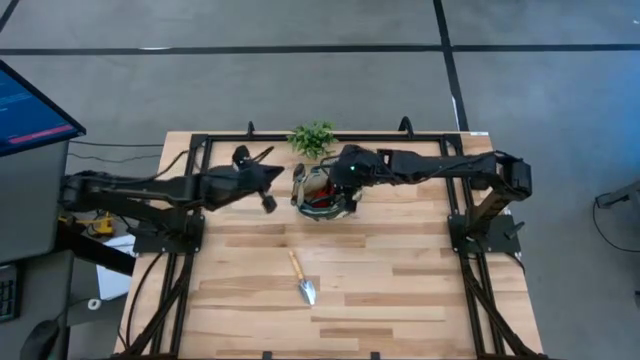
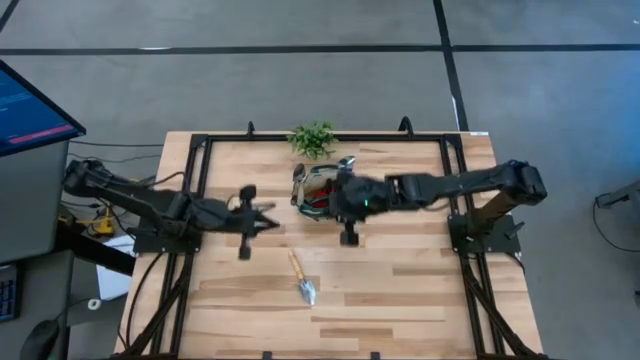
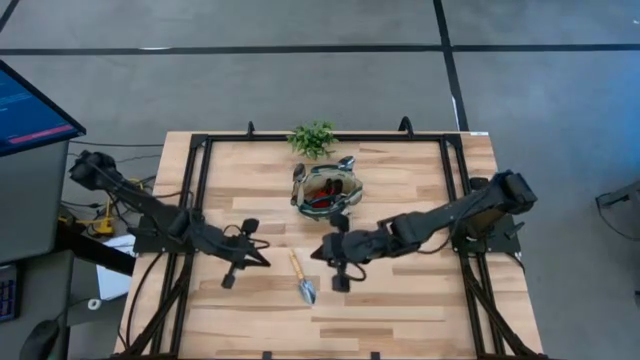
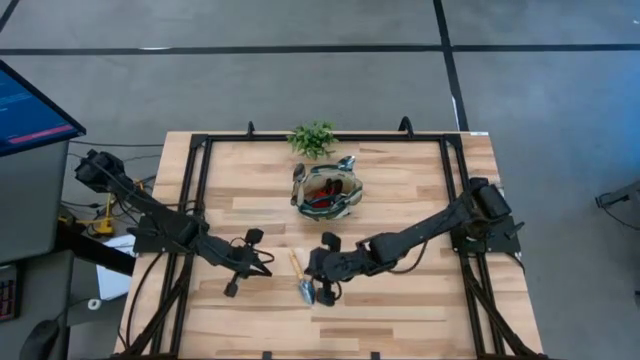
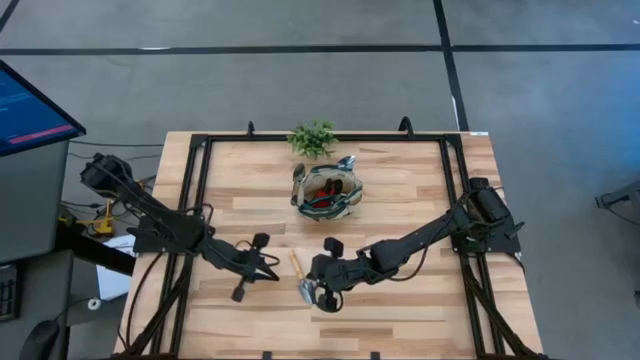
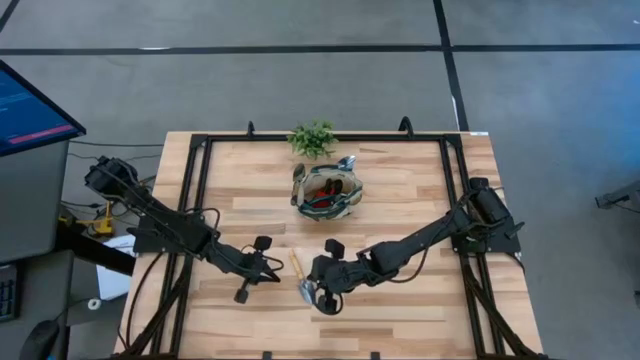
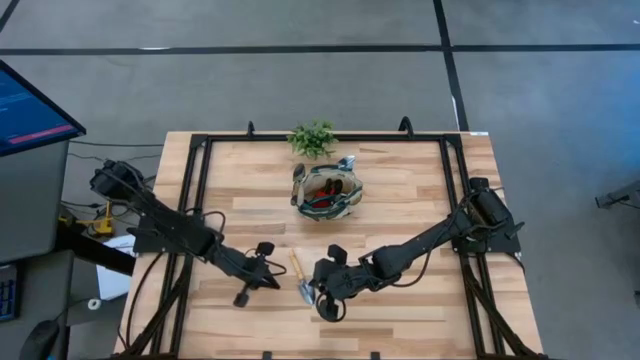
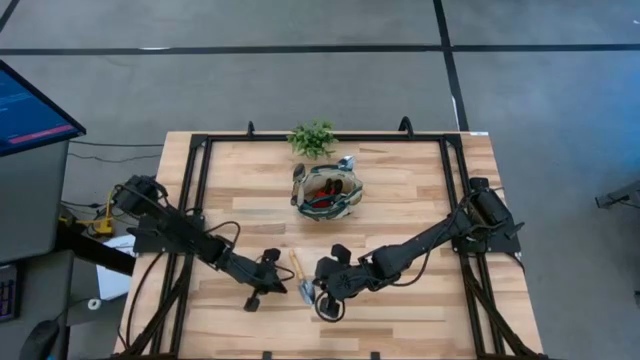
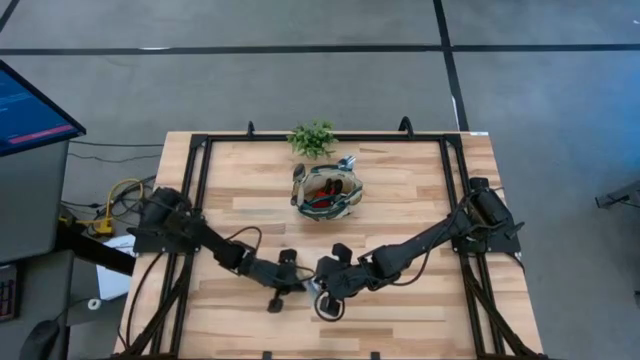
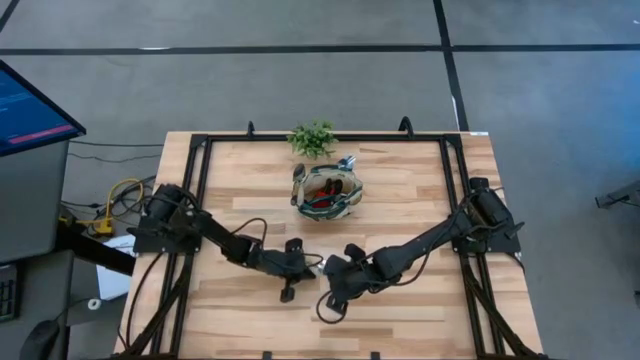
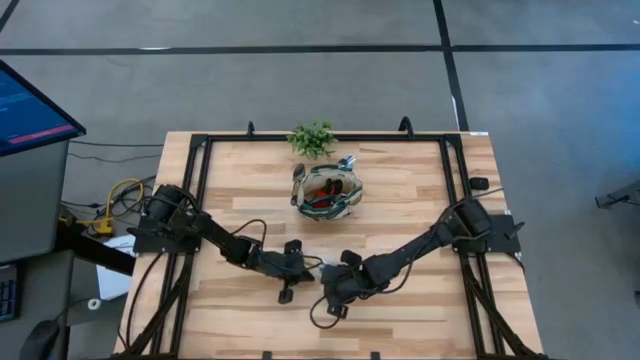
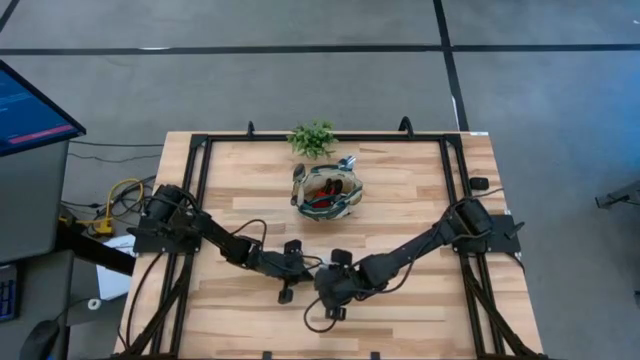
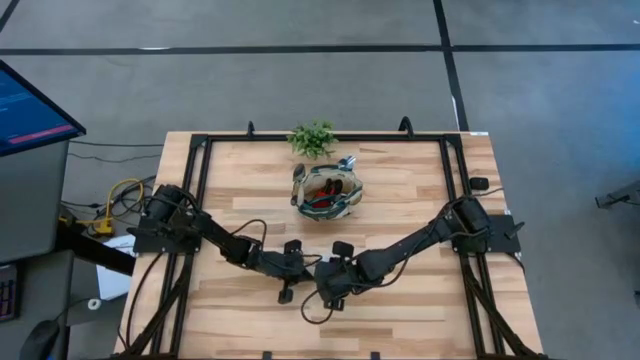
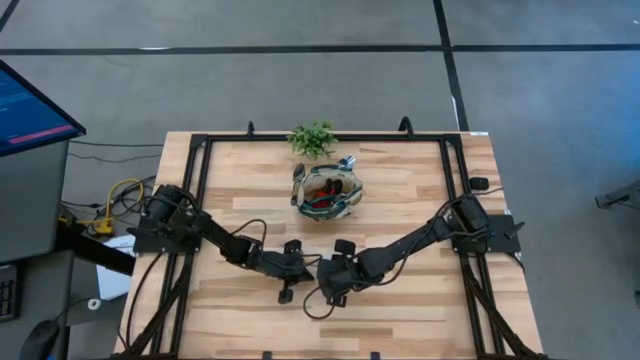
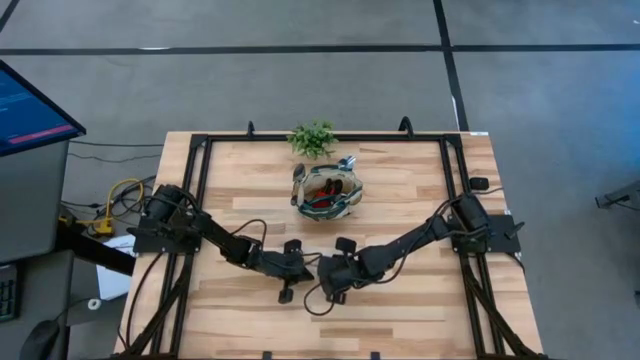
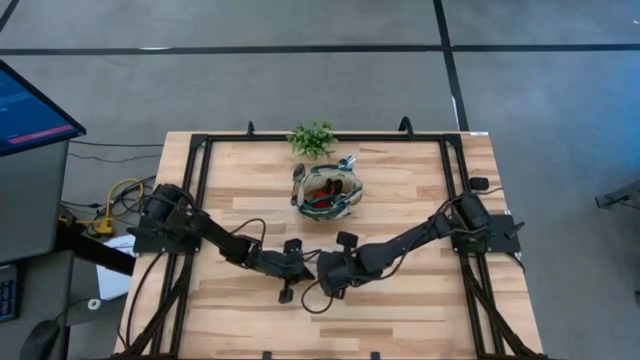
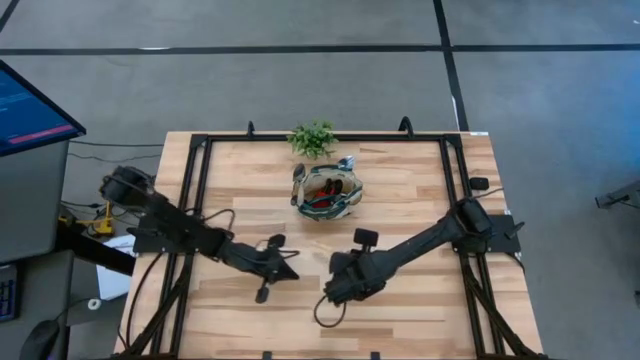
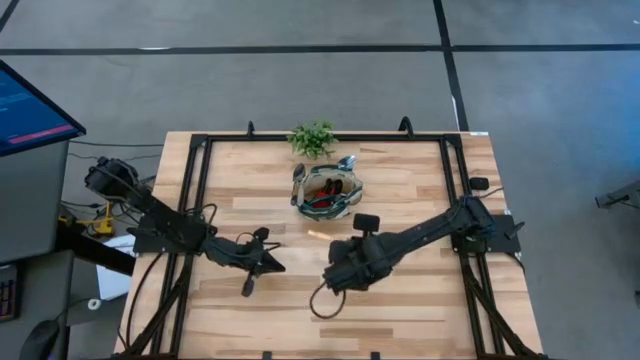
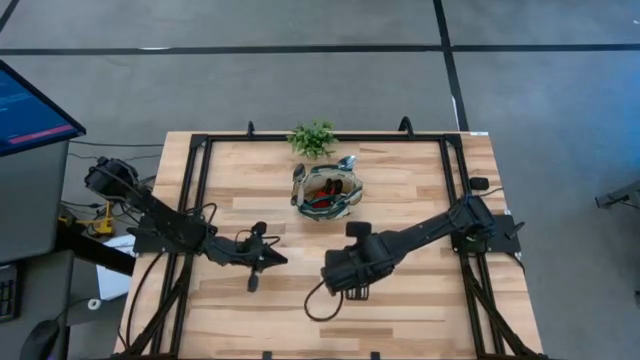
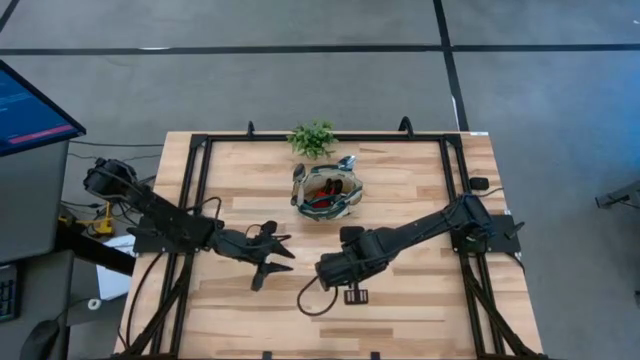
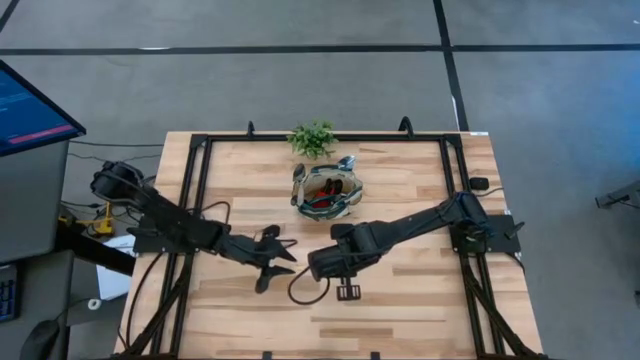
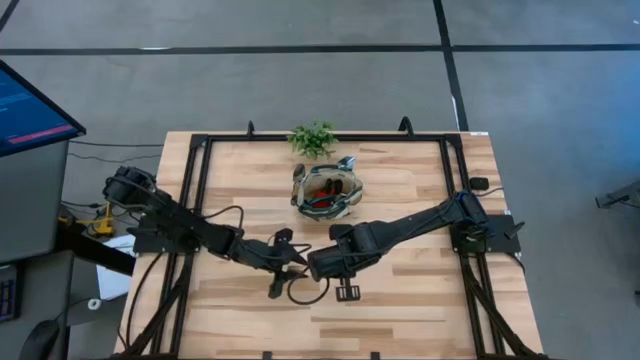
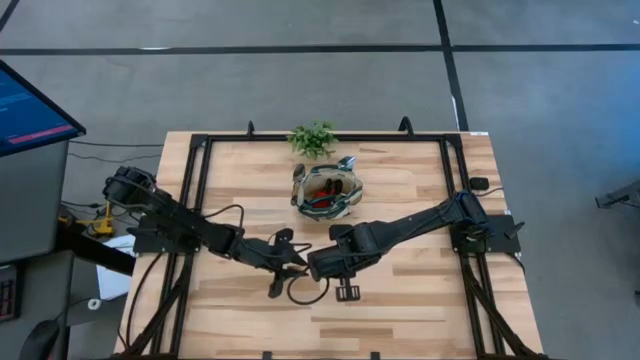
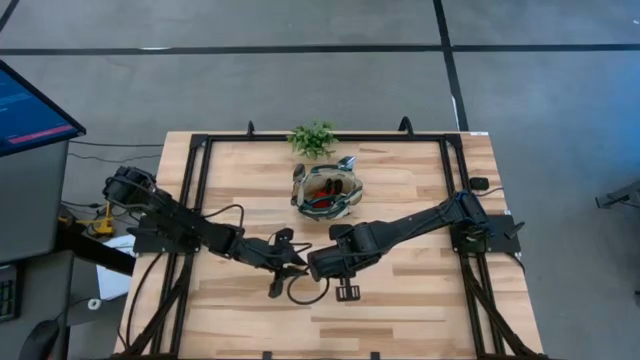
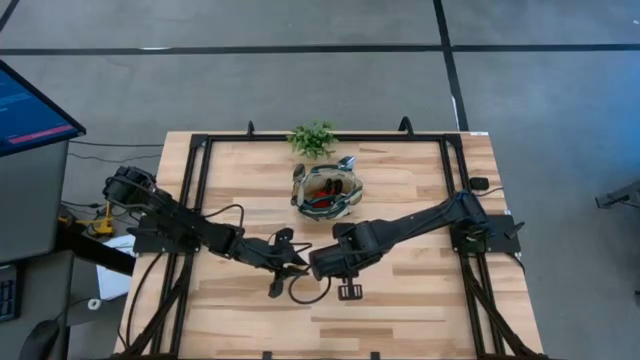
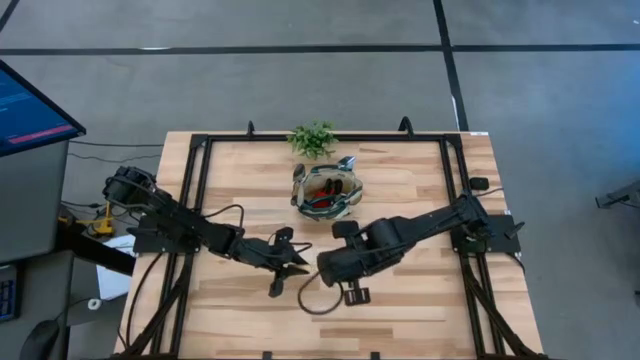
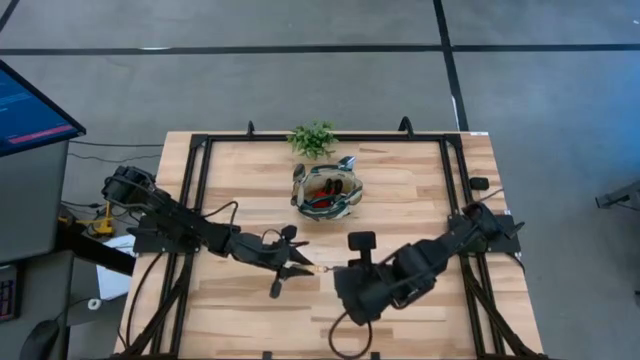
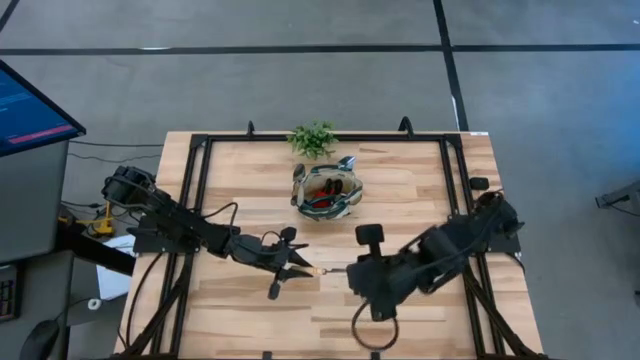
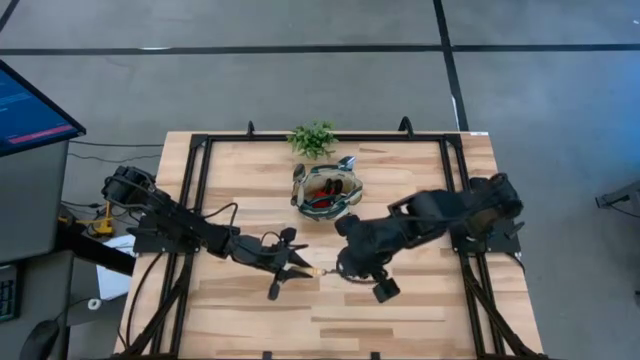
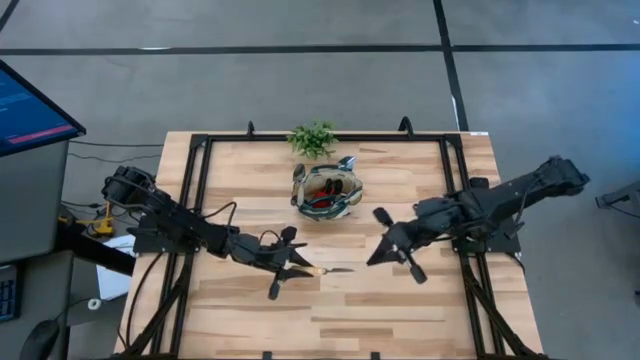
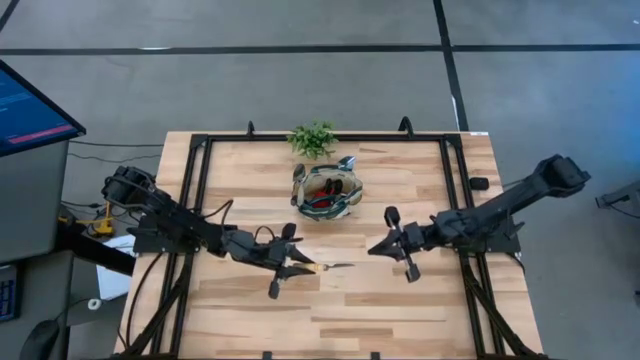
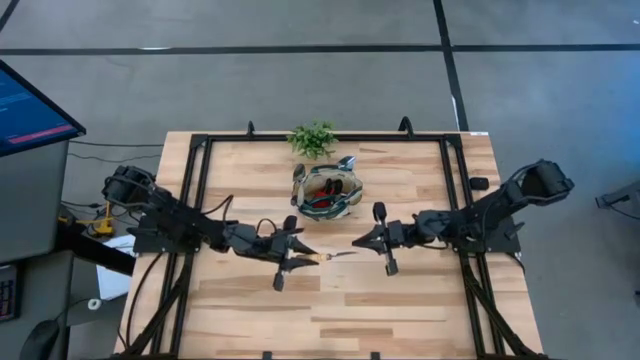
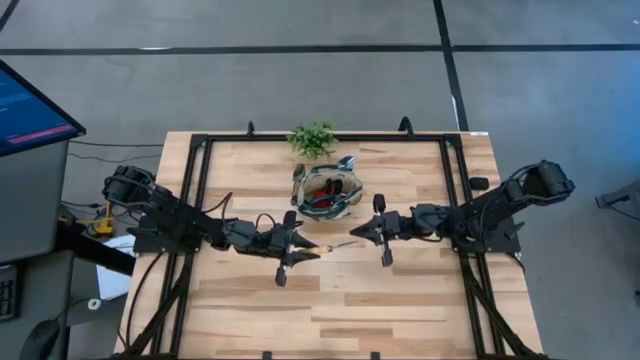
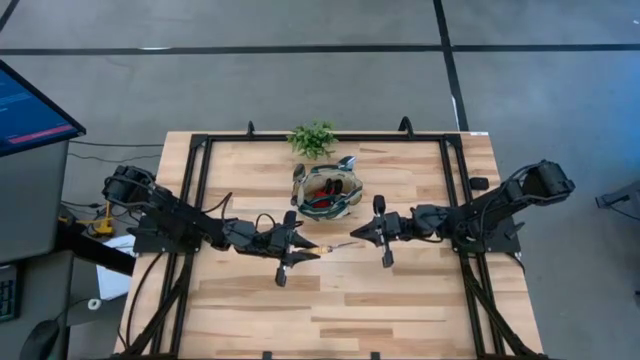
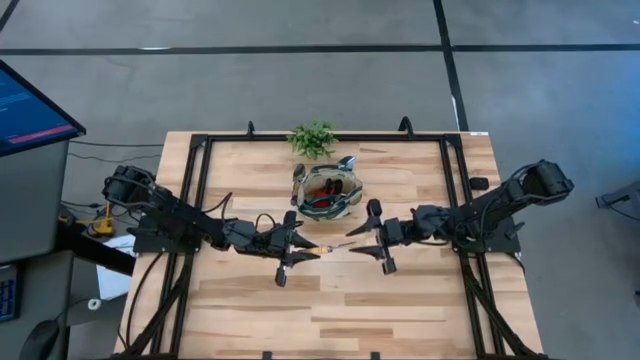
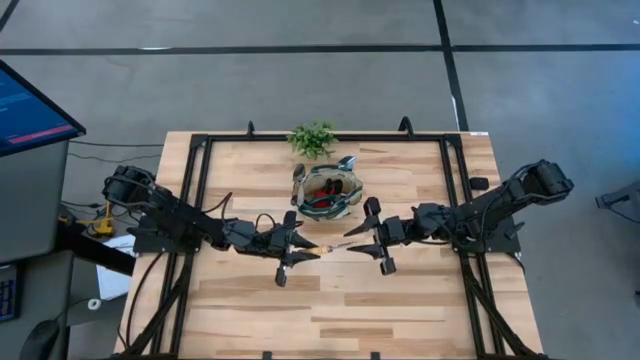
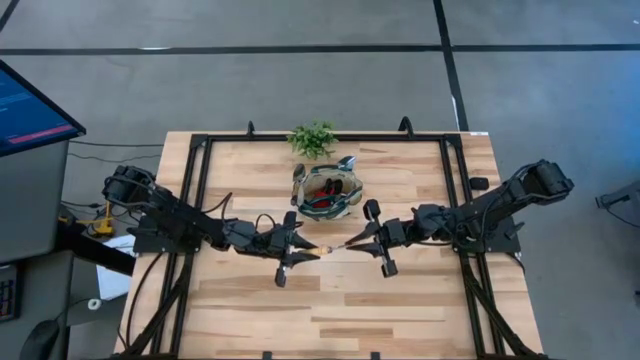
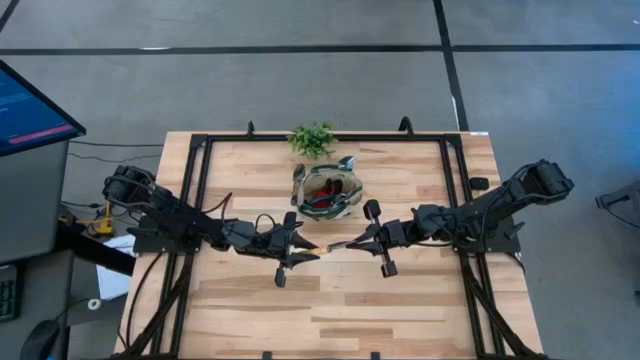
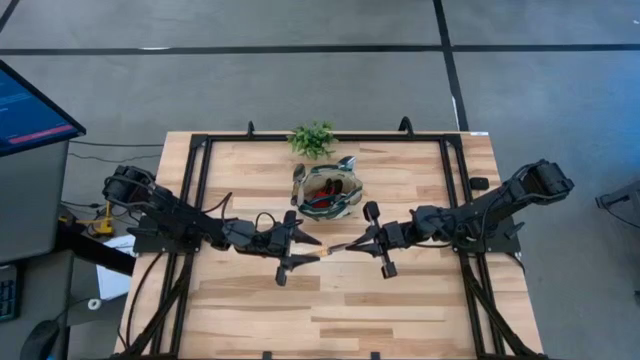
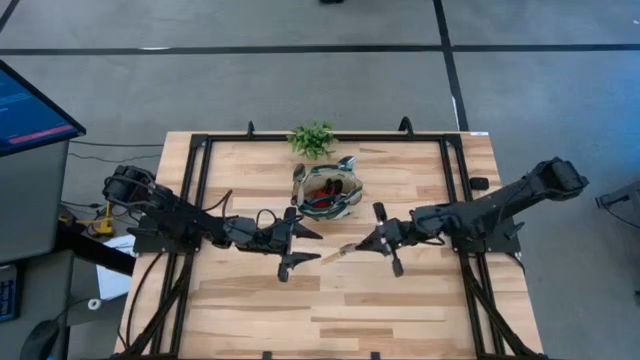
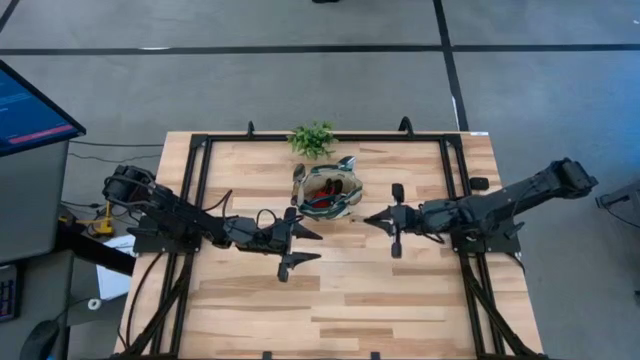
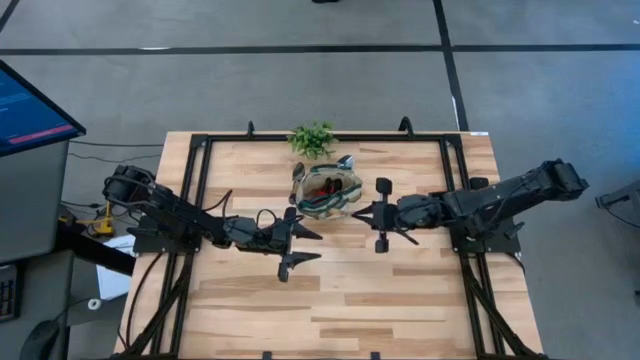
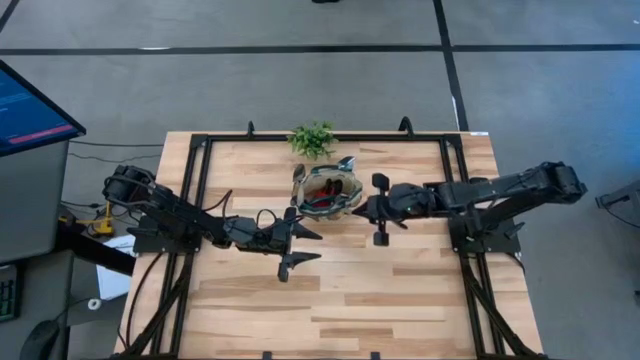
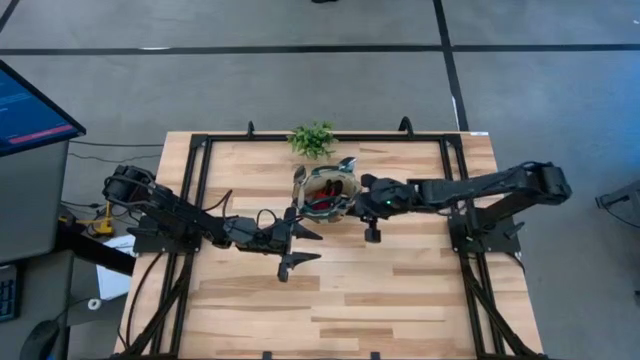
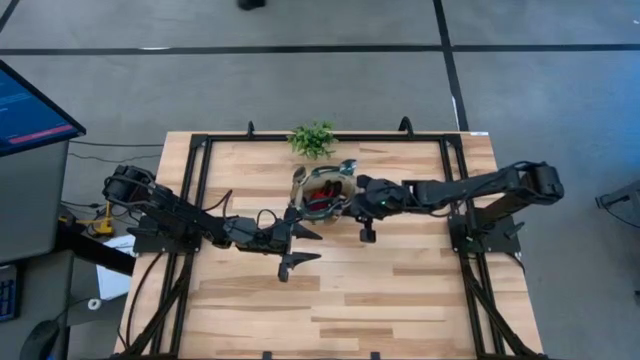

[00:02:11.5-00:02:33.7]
Task: Pick & Place Garden tools in Gardening bag
Put the trowel into the gardening bag
